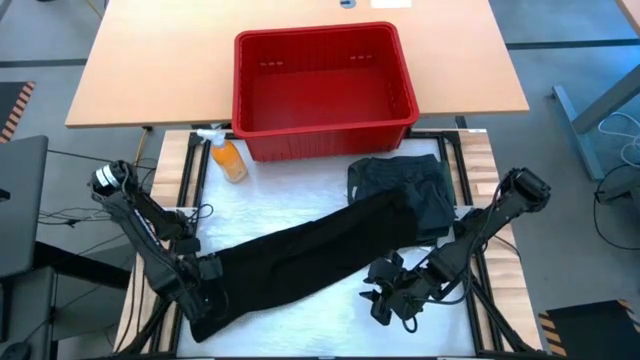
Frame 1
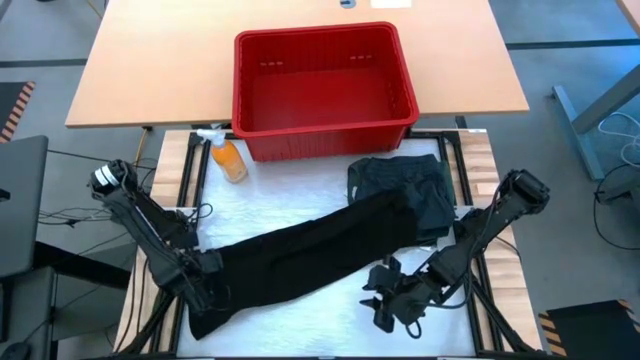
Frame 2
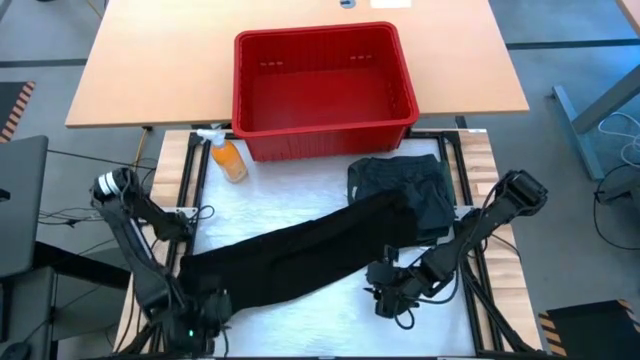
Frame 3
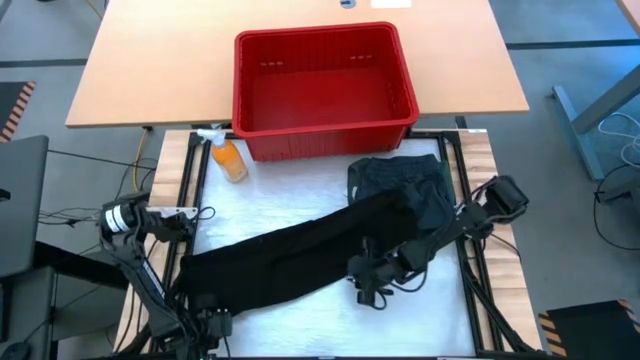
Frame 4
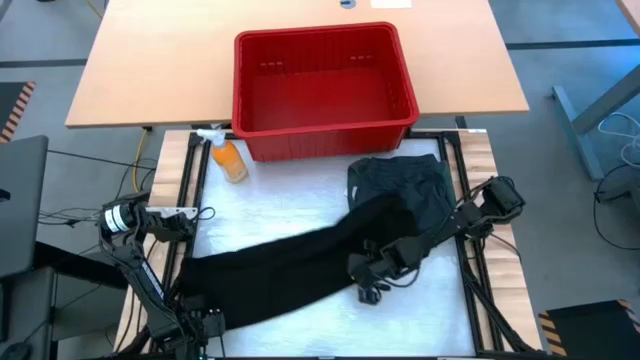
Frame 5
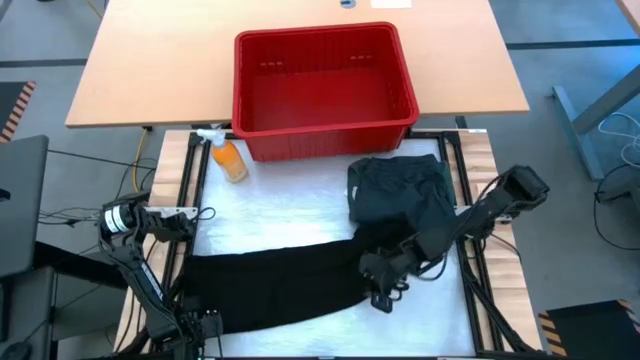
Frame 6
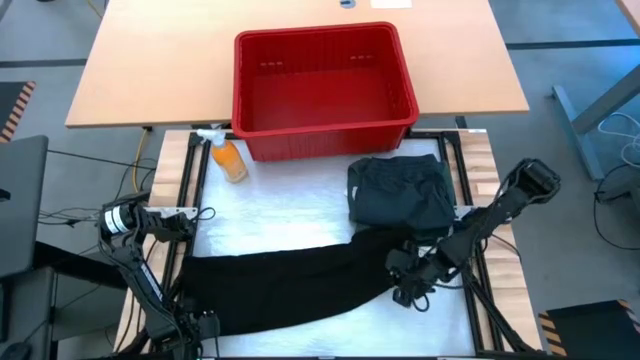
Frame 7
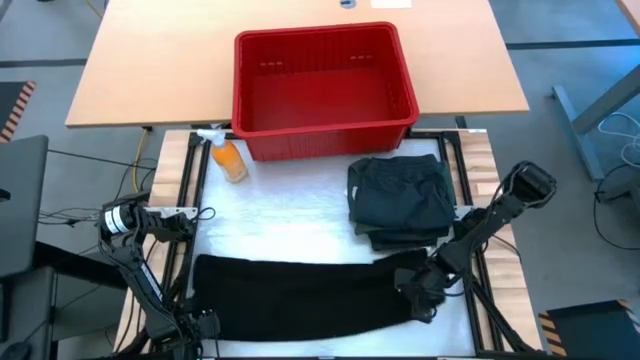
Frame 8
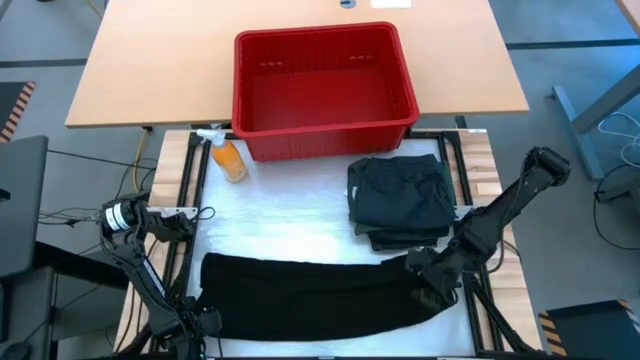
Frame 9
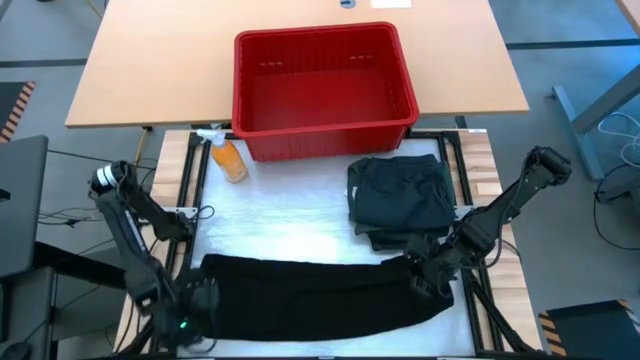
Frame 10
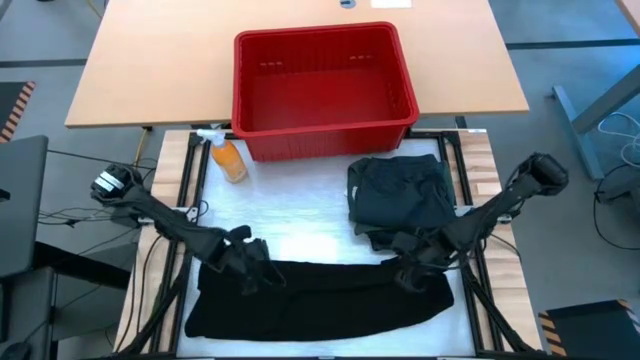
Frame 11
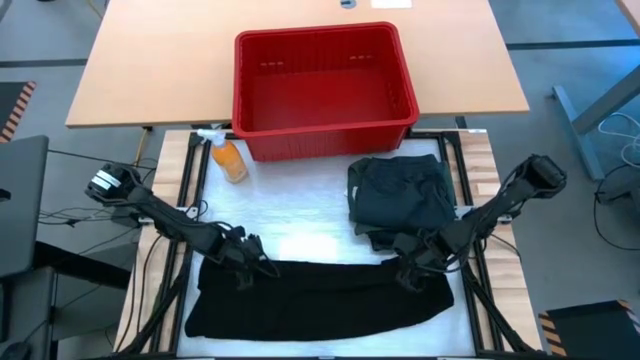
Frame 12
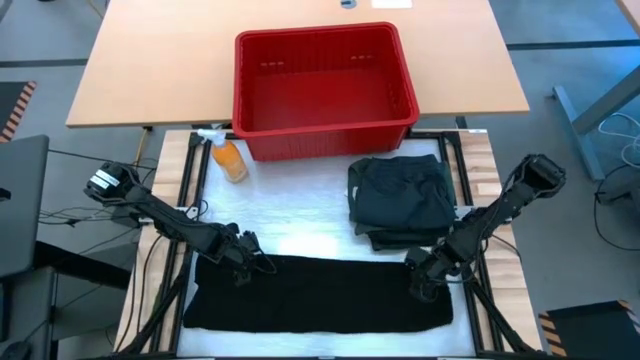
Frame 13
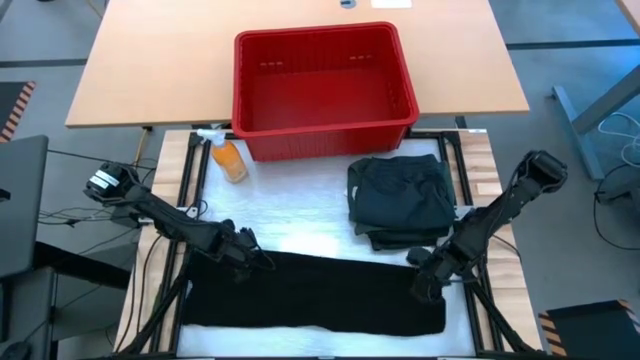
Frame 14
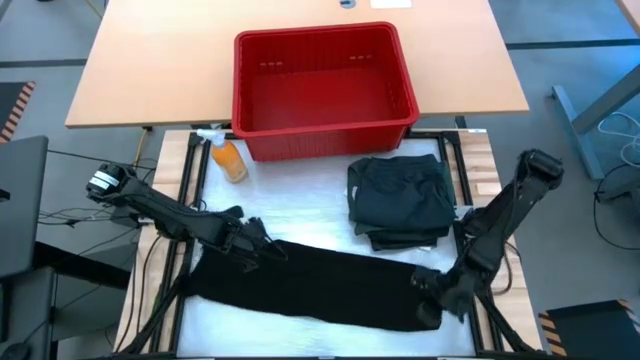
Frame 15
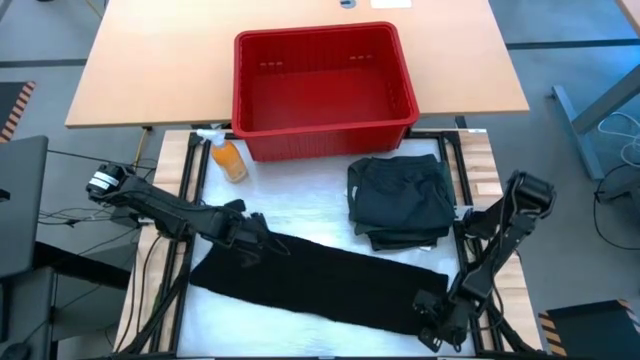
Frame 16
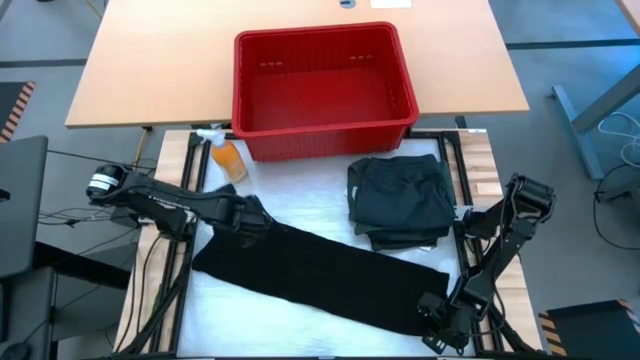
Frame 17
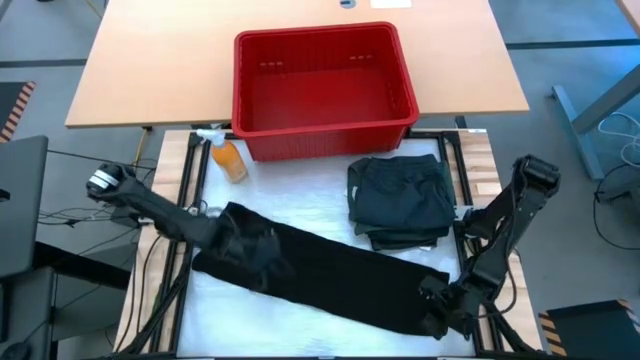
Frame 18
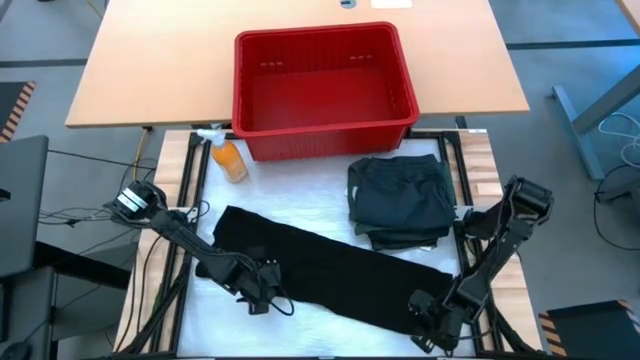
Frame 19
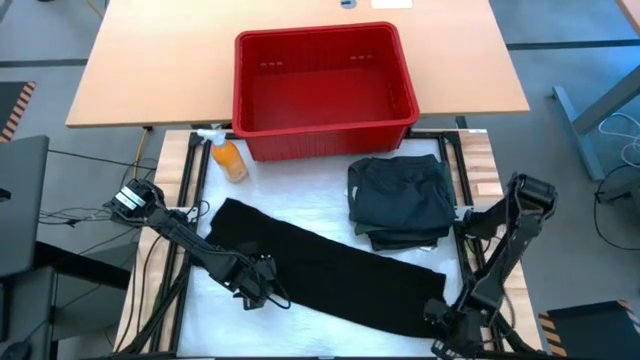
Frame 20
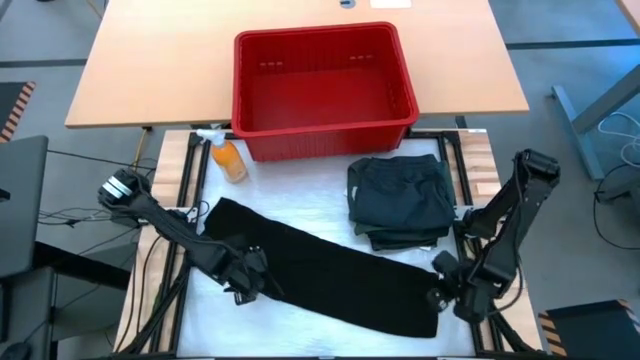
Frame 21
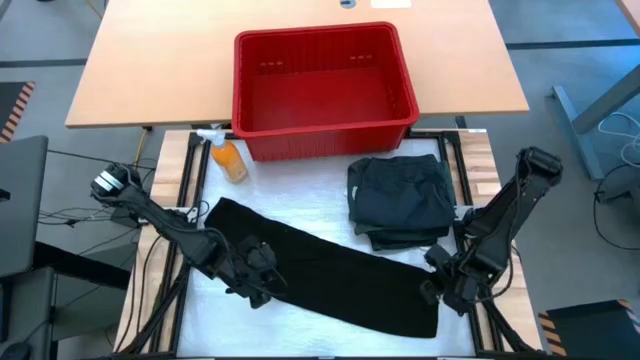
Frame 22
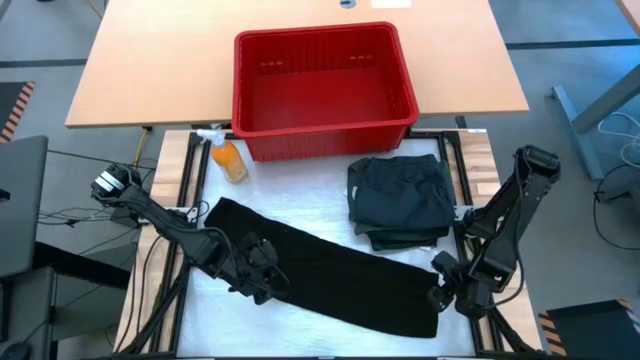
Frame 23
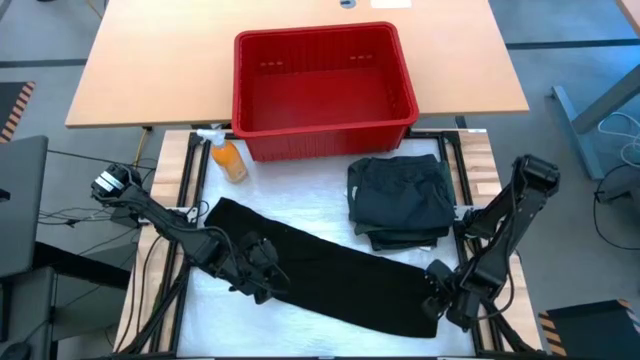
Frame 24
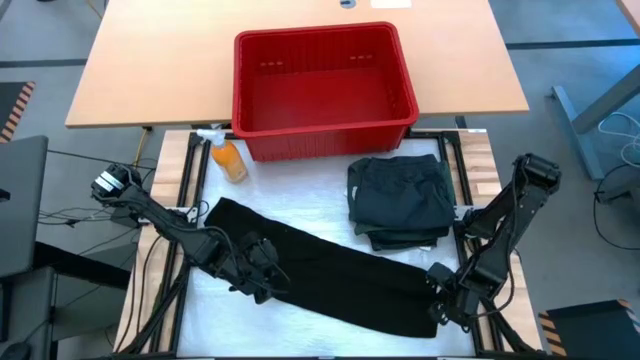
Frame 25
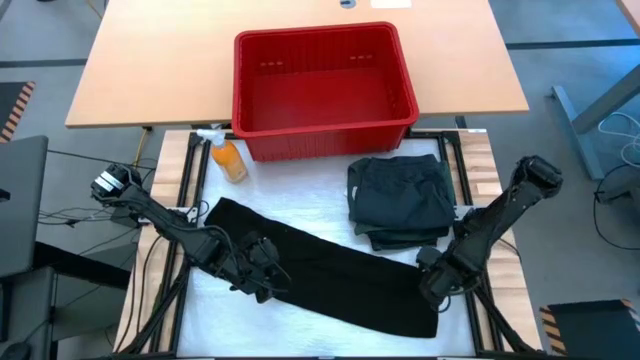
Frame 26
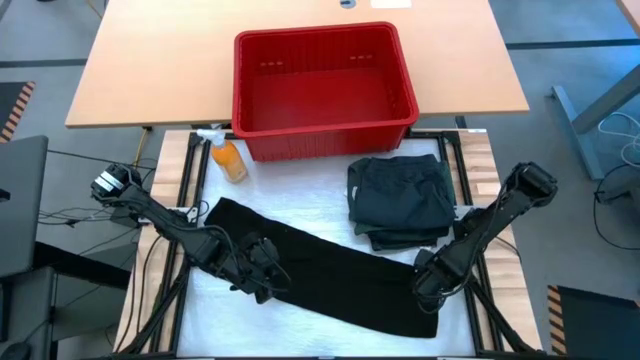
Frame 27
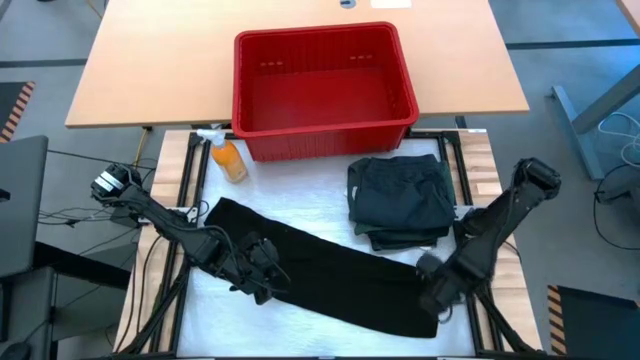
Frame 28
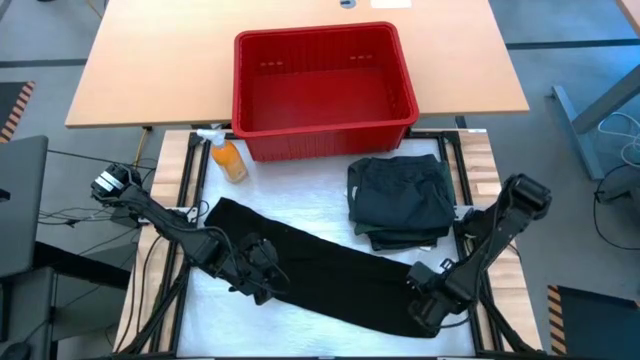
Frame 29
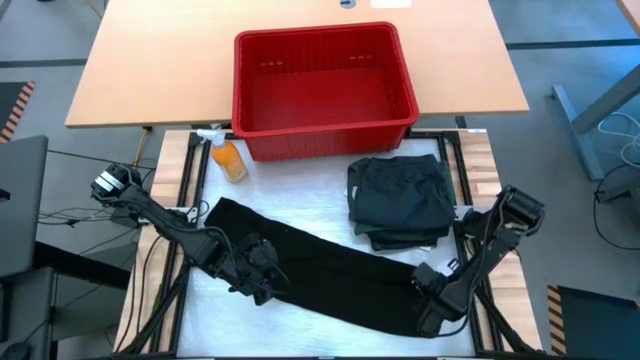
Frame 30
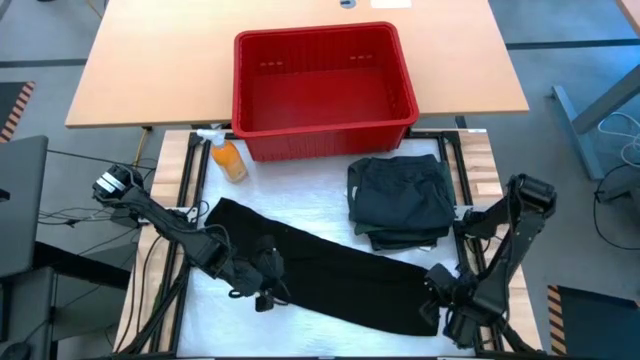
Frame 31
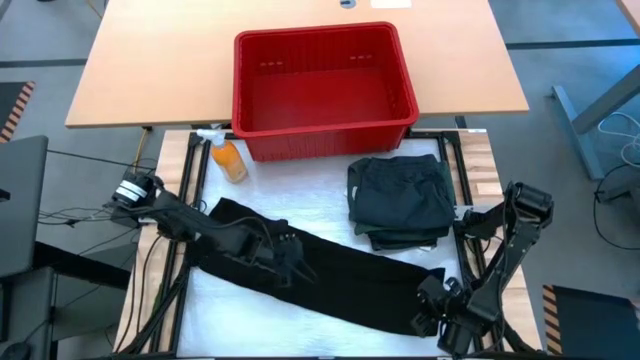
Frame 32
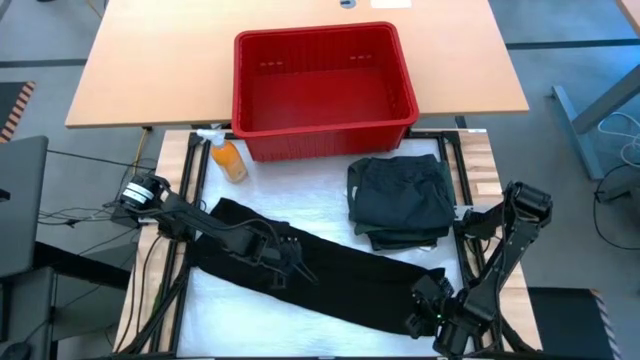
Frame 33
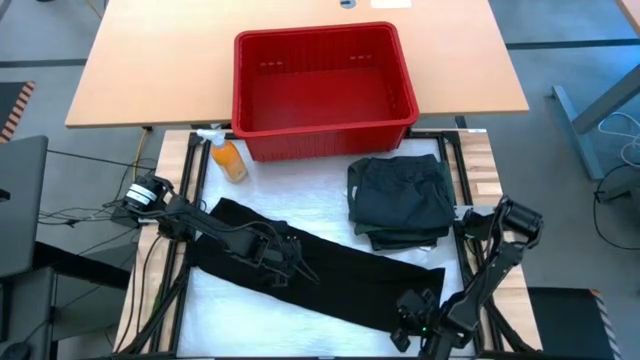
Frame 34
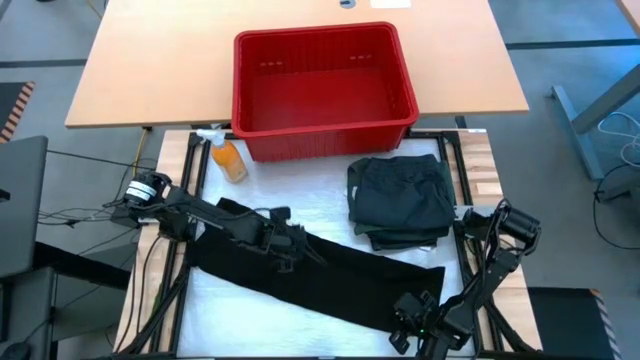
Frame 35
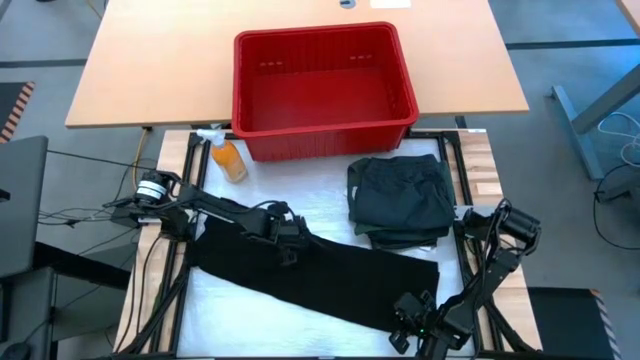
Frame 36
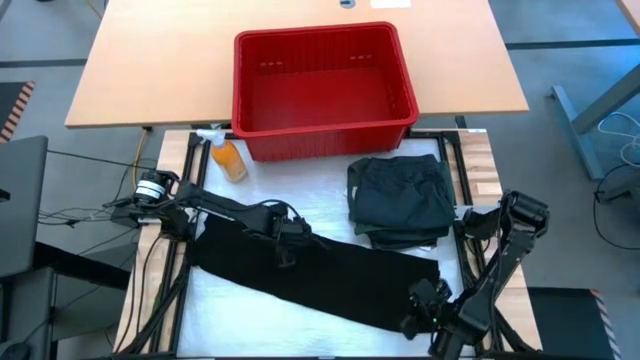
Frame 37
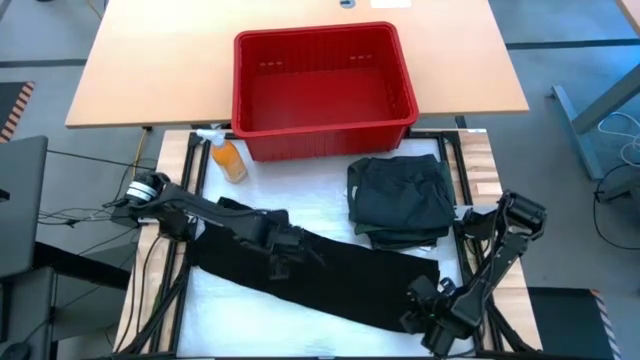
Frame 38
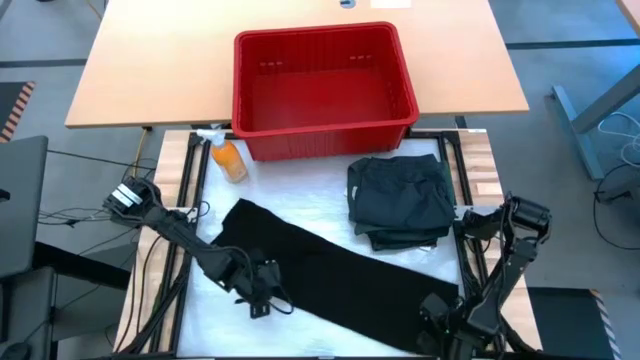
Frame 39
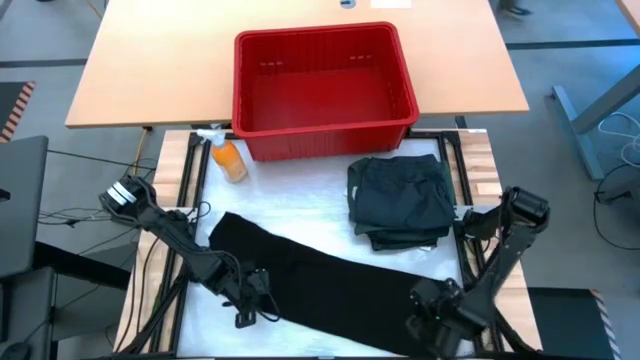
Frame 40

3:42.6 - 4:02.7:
Task: Fold Laundry from Bin
Fold the black shirt

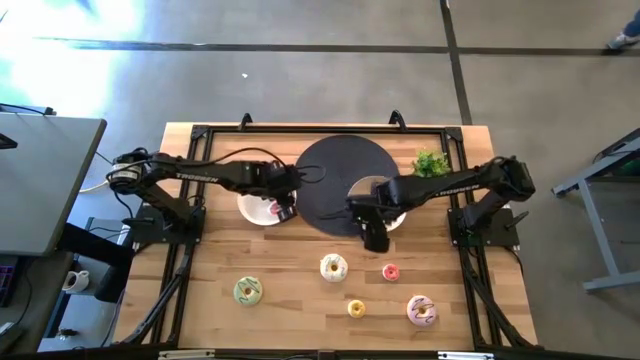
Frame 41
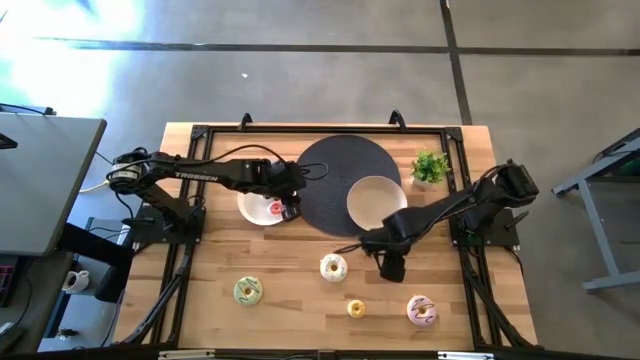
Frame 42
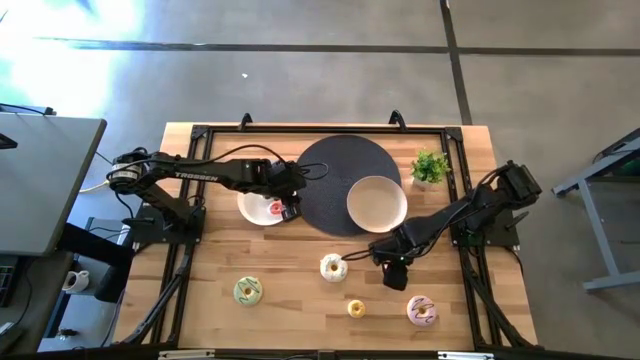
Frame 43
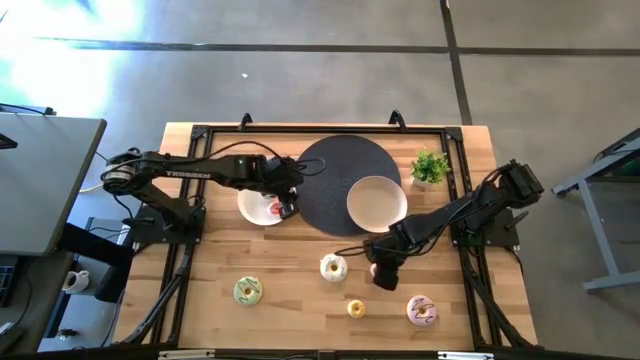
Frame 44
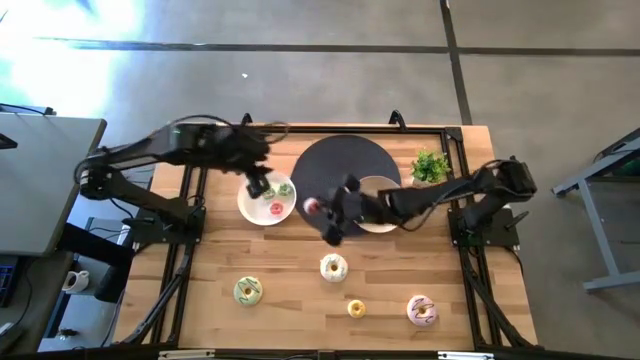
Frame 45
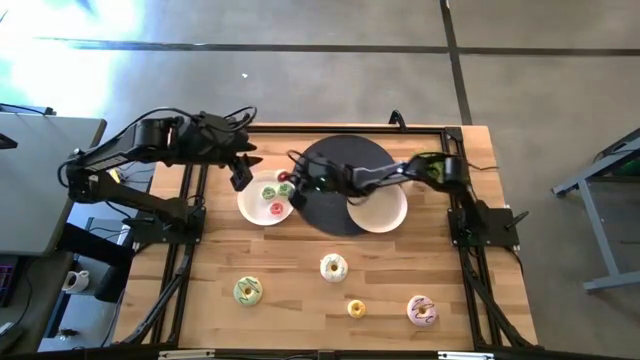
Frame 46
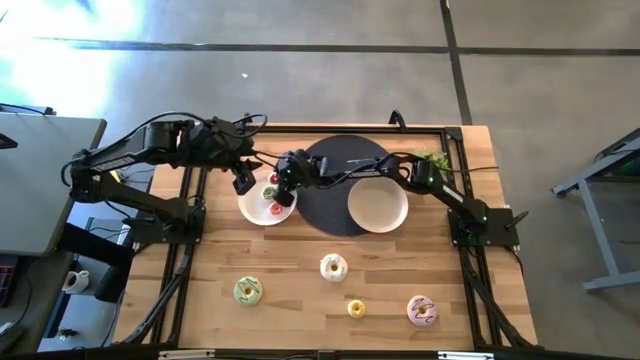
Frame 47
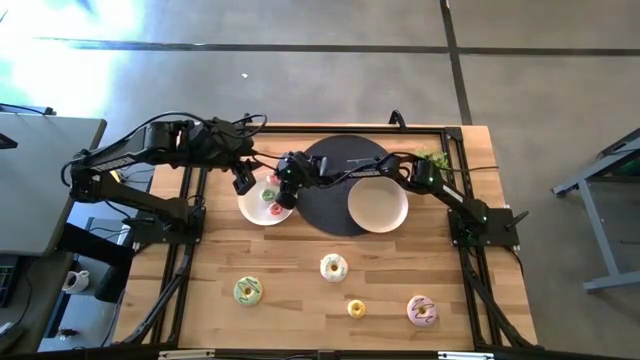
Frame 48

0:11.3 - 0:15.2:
Task: Pick & Place donuts
Put the small pink donut into the white plate
